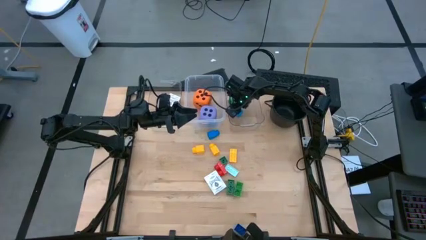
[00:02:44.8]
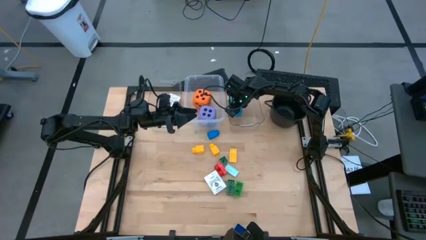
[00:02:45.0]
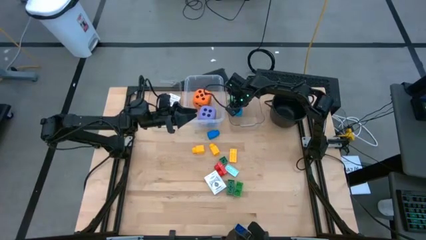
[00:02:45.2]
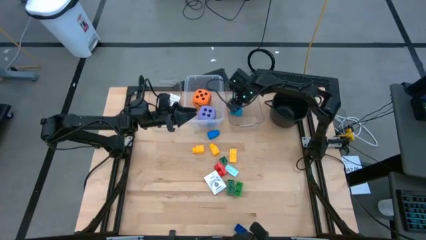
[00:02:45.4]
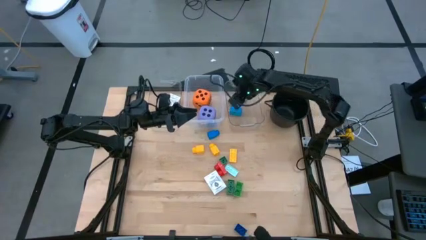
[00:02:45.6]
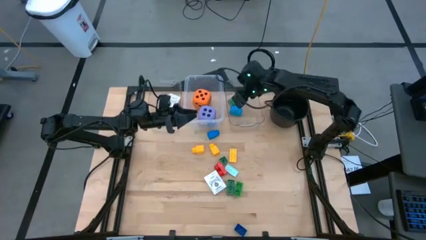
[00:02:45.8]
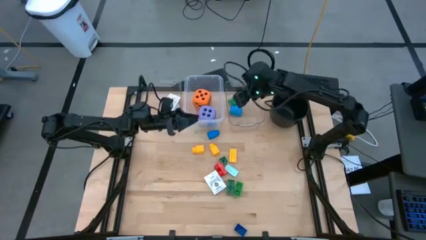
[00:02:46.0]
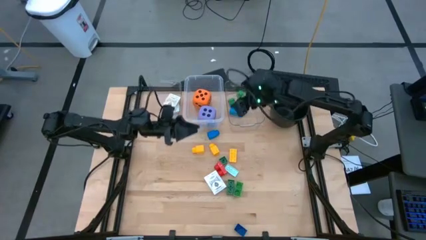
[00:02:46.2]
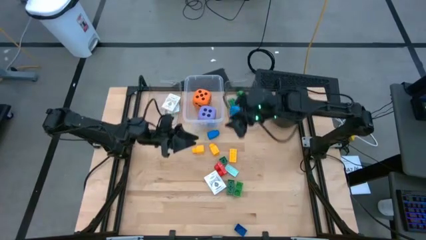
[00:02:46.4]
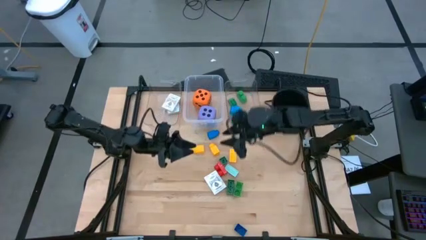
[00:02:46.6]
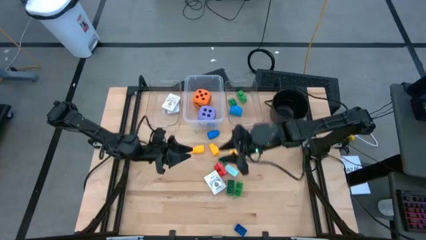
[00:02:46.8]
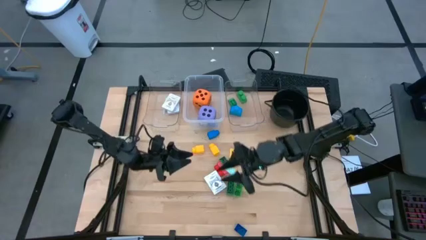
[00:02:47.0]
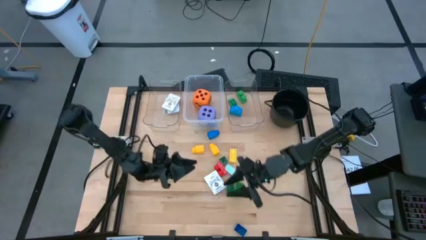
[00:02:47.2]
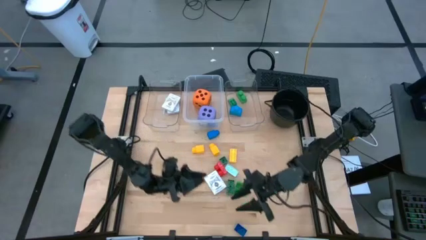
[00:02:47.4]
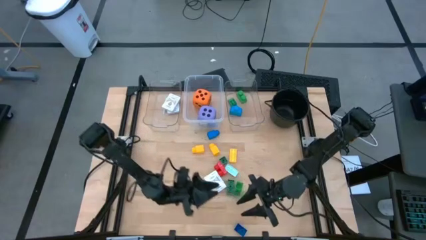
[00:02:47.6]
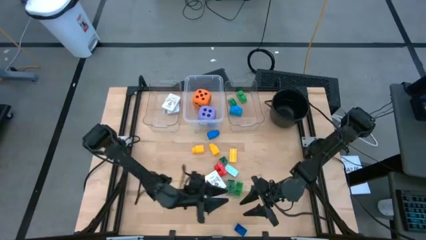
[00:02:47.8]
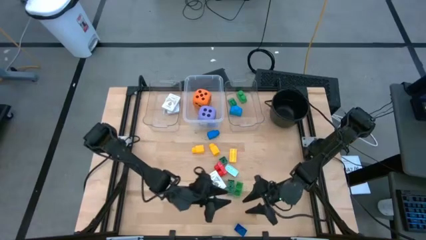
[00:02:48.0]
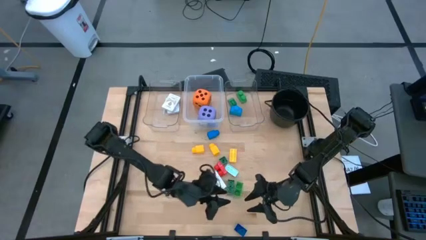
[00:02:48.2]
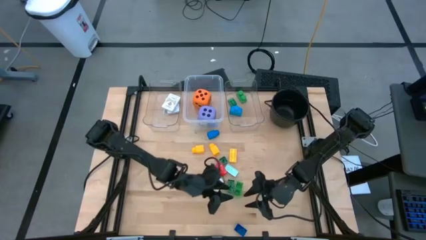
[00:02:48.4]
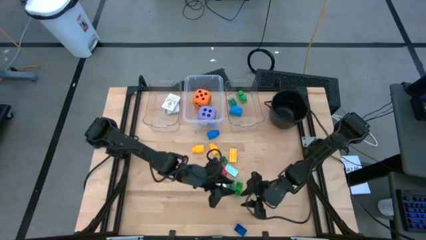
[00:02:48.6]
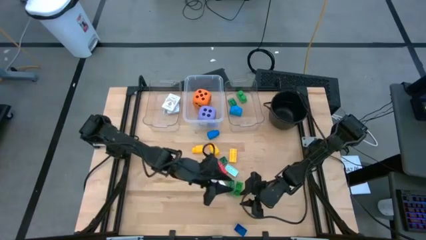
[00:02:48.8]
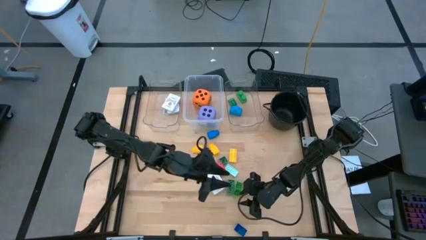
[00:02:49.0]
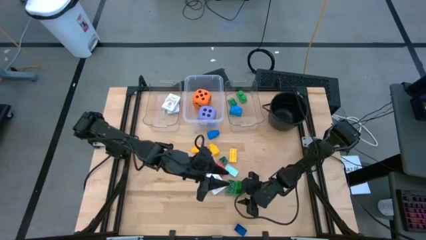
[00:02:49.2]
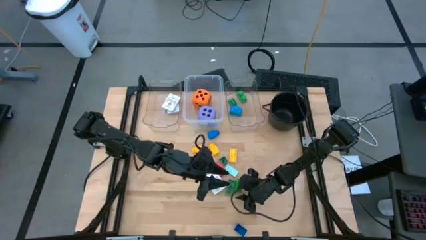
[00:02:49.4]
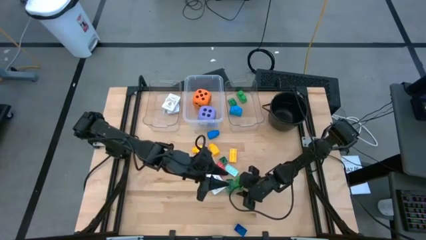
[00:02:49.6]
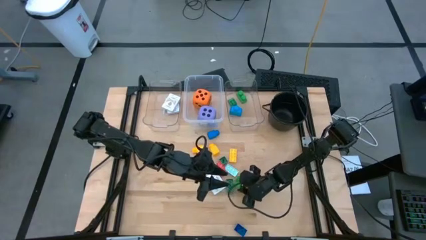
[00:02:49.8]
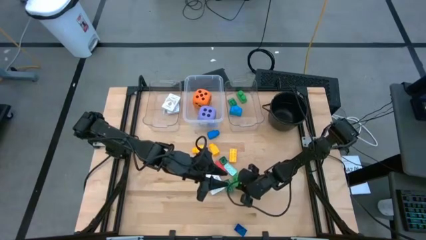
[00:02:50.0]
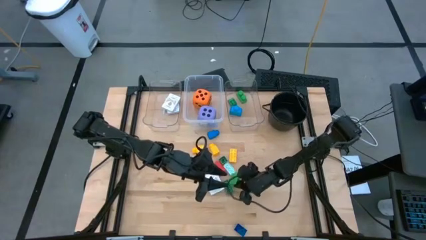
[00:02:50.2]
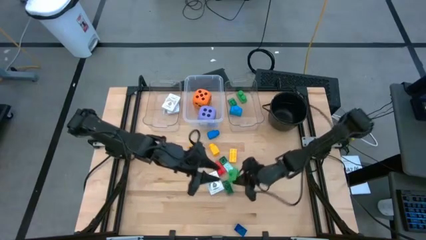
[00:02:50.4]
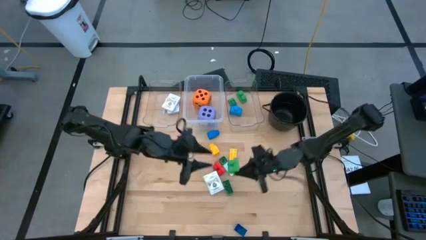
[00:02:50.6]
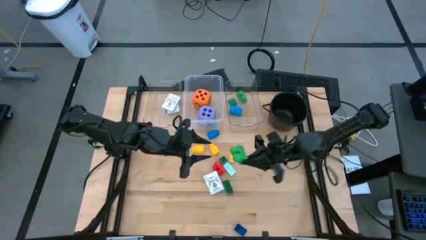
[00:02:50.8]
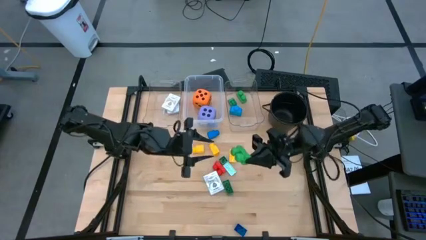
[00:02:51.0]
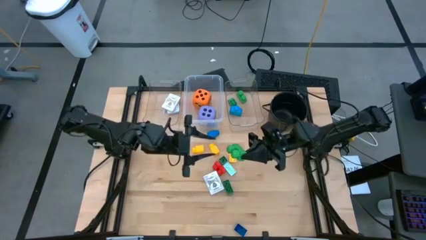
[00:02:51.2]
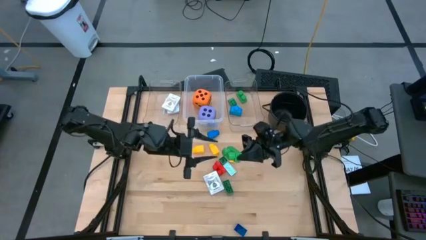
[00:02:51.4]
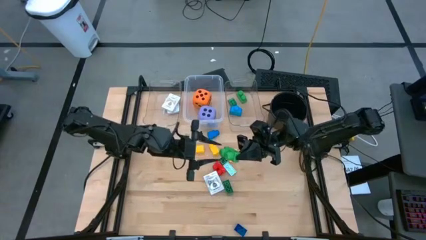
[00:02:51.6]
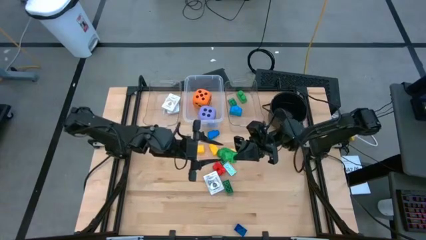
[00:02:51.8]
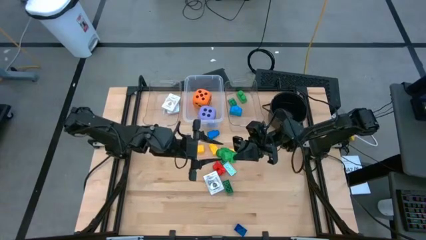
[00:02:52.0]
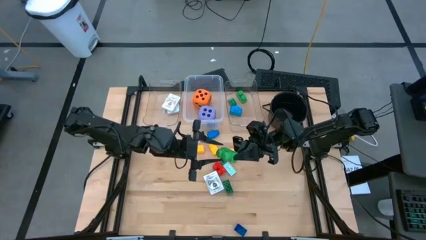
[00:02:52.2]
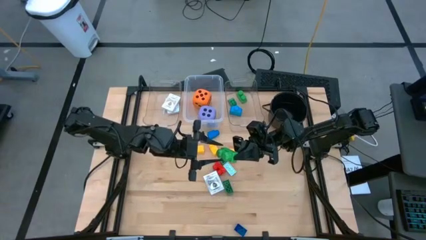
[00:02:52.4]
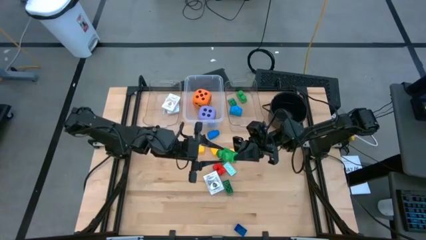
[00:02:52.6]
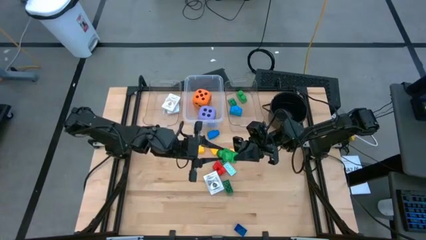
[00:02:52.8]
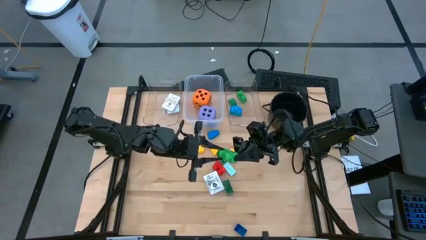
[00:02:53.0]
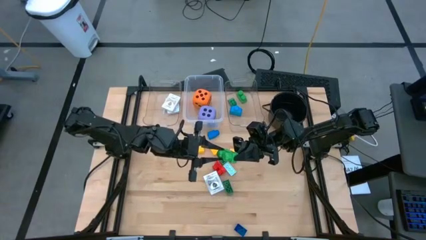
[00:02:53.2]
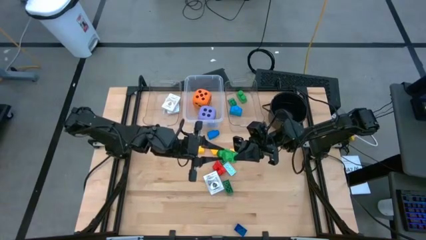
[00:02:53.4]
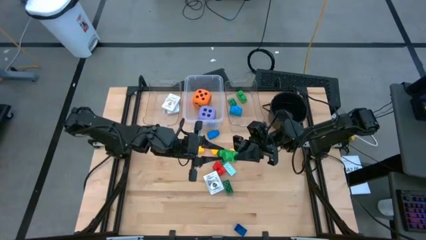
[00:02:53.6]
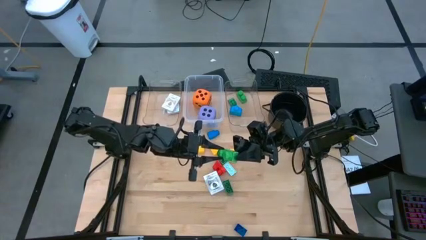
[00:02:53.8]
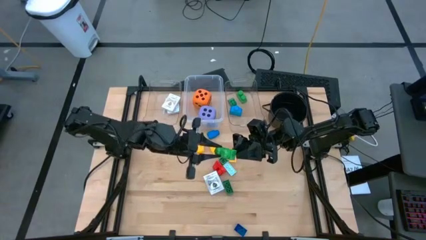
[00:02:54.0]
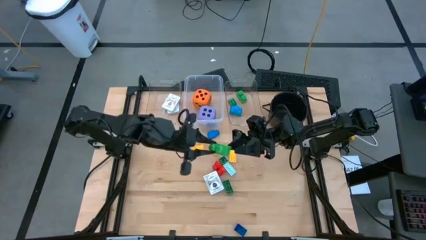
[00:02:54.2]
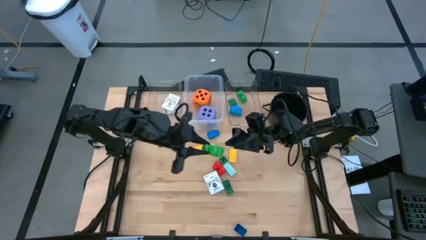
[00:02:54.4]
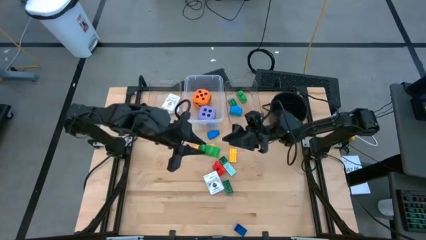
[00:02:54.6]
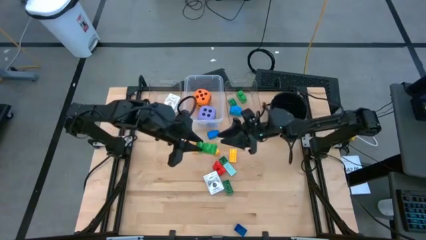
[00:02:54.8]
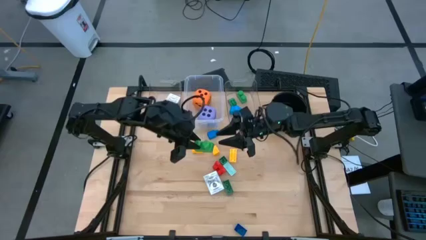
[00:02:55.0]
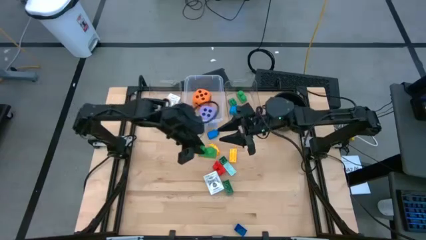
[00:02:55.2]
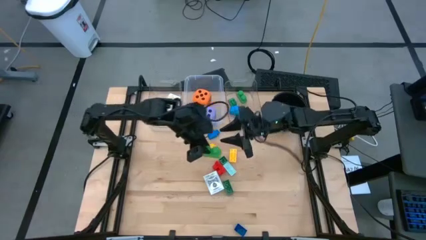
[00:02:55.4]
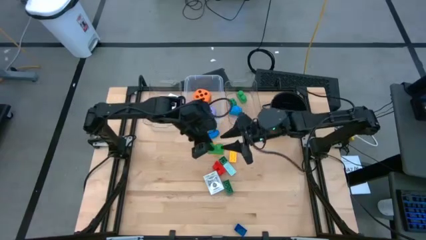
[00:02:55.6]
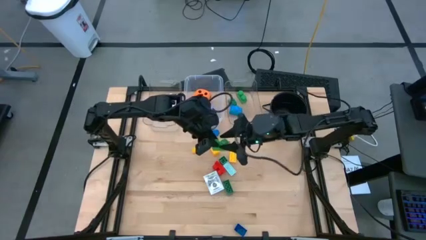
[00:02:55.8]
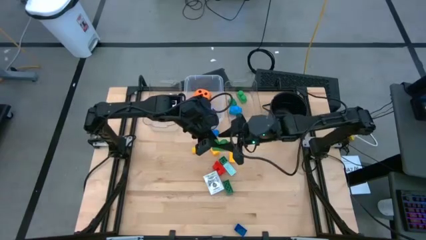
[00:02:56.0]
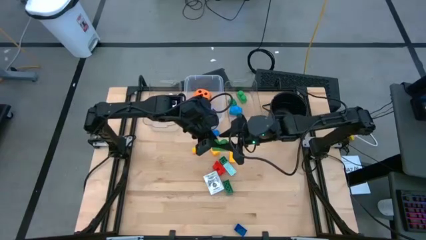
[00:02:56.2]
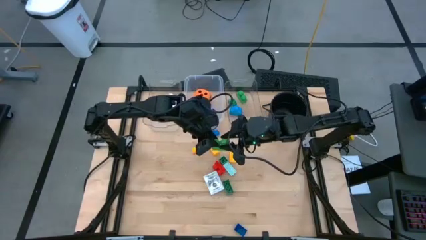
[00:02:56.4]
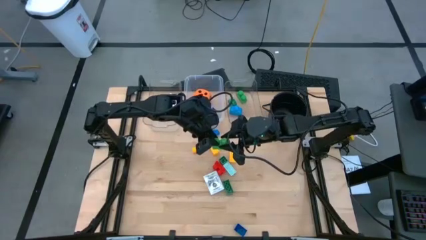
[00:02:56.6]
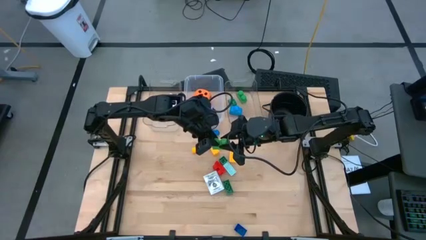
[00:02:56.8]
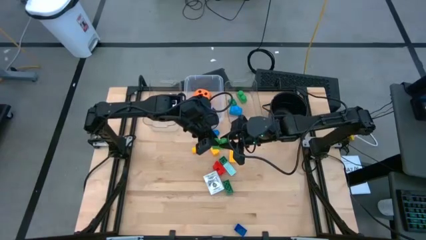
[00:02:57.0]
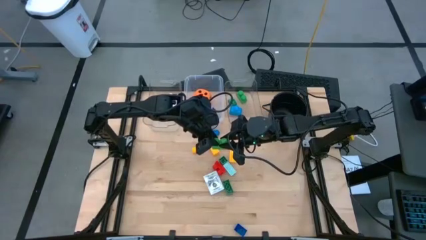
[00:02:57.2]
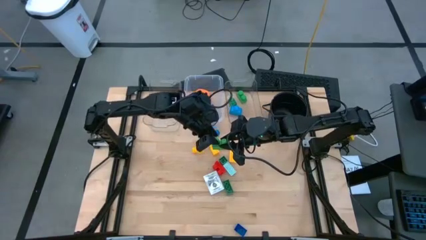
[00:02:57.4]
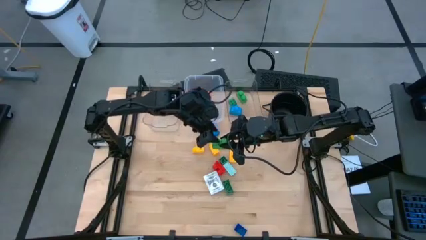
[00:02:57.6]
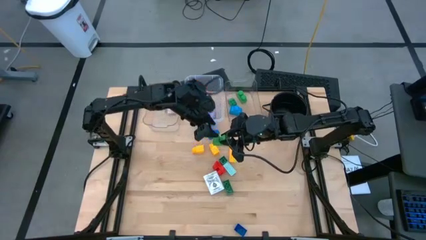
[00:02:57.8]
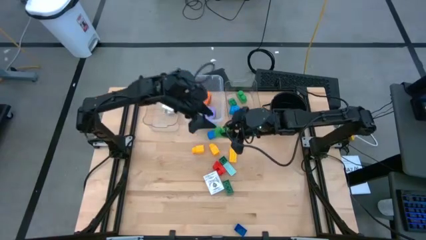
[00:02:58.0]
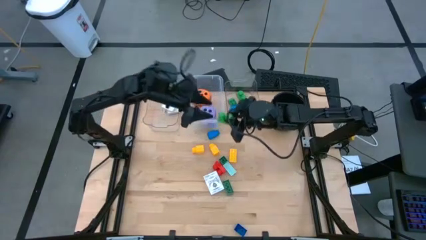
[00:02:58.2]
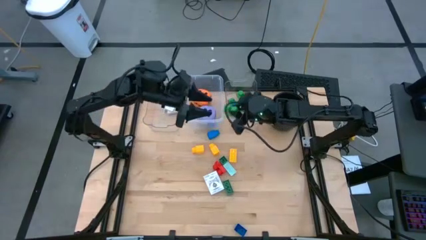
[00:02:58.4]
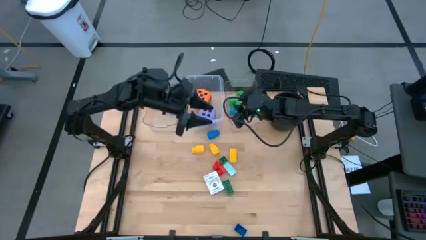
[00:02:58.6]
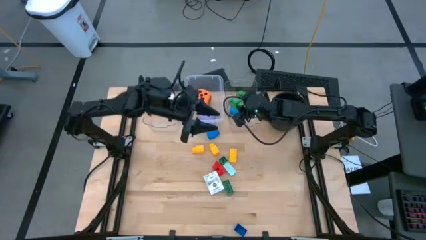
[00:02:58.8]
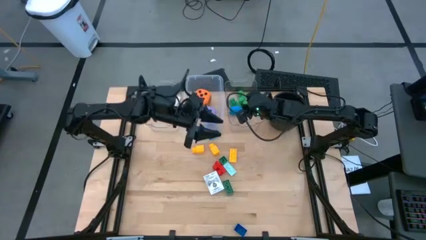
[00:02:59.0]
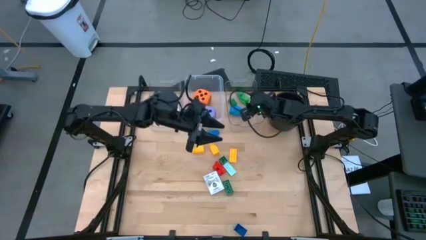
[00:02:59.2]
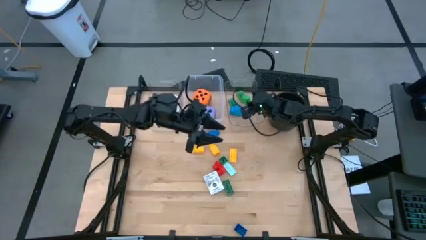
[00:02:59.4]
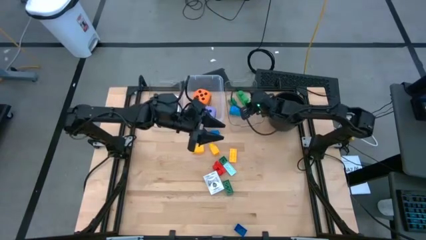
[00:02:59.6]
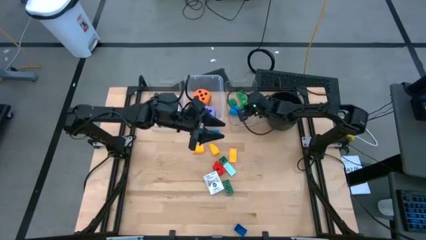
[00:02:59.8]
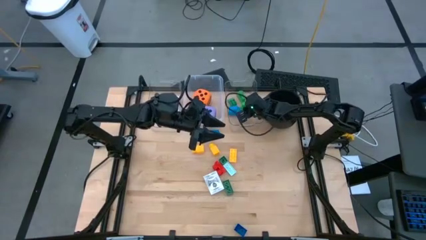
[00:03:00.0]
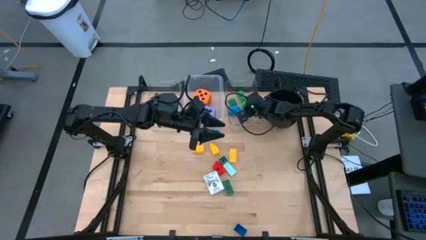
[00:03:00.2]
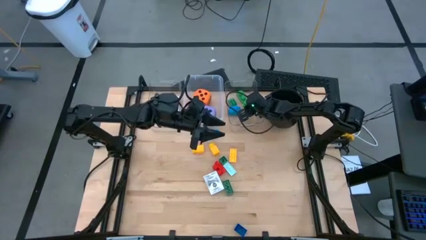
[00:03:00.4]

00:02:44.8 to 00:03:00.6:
Task: Pick & Place Toys
Put the light green game piece into the right transparent bin
